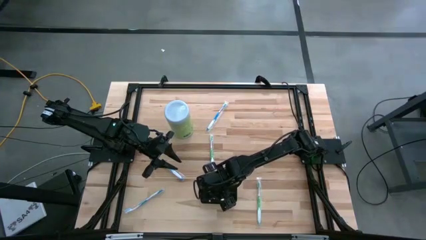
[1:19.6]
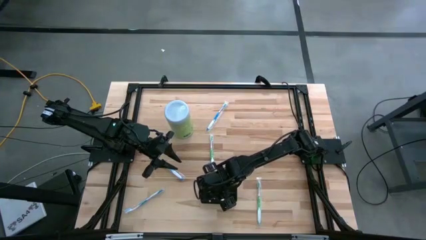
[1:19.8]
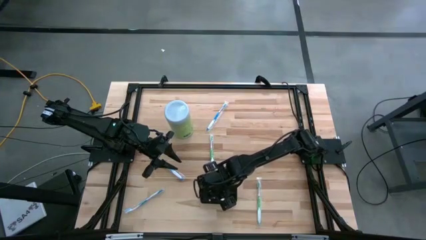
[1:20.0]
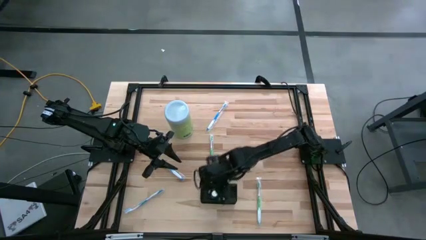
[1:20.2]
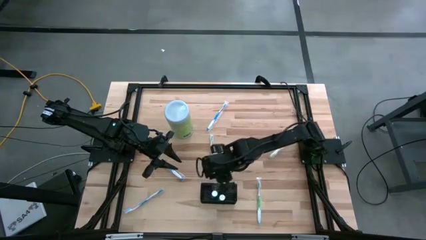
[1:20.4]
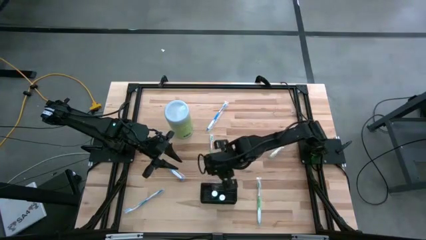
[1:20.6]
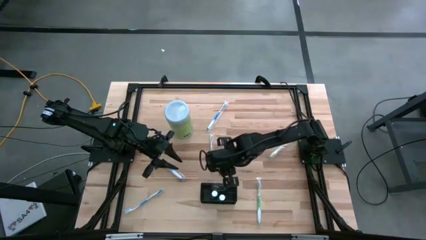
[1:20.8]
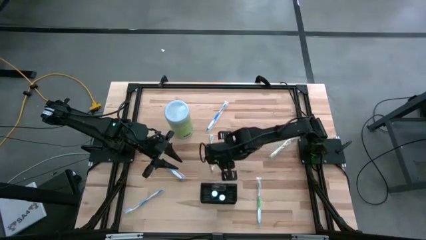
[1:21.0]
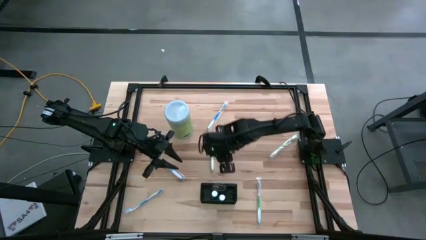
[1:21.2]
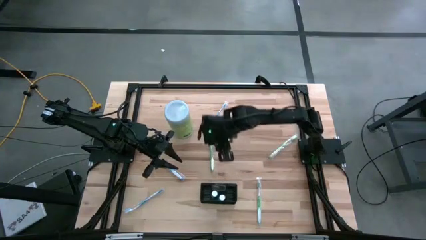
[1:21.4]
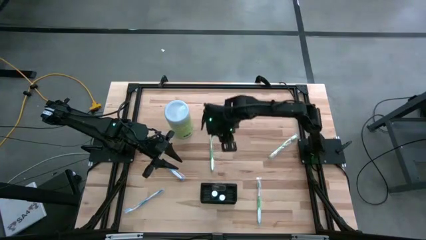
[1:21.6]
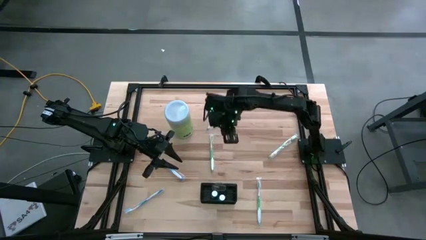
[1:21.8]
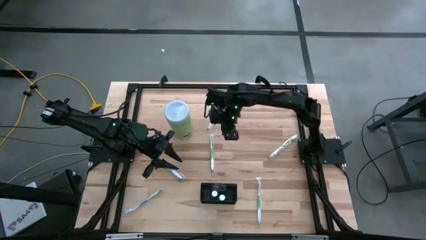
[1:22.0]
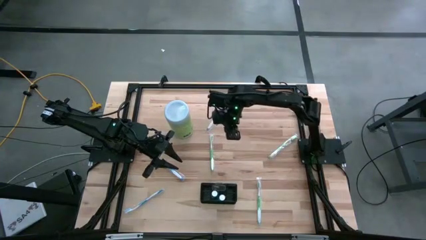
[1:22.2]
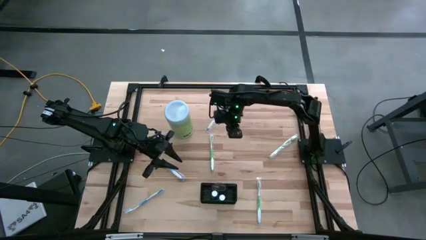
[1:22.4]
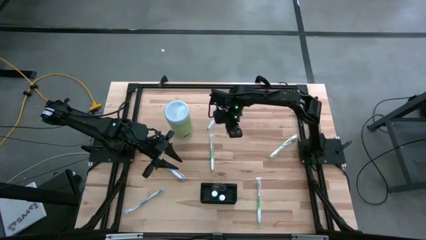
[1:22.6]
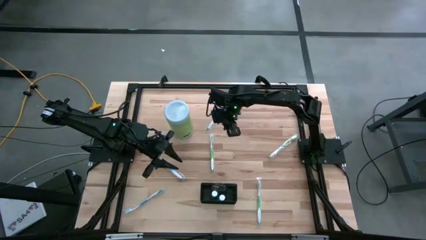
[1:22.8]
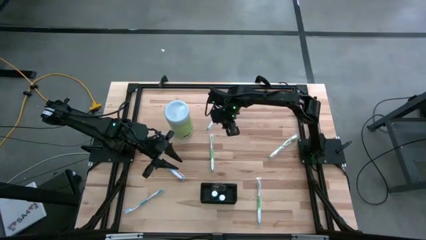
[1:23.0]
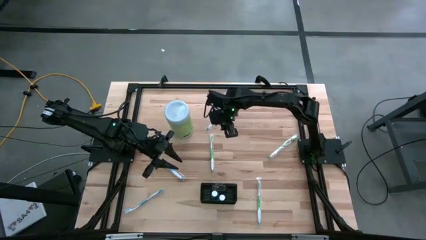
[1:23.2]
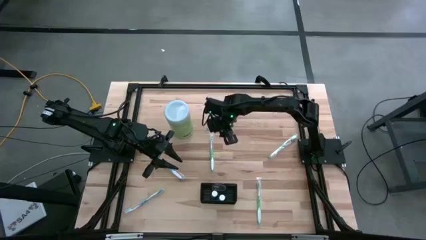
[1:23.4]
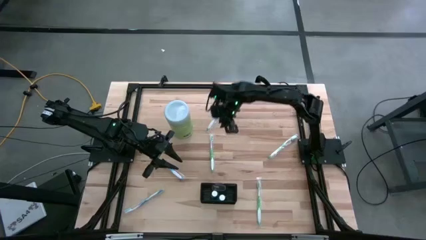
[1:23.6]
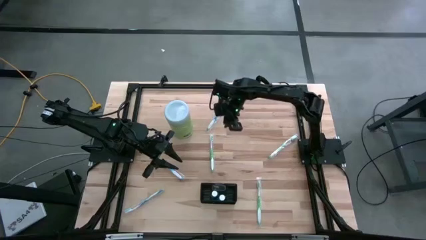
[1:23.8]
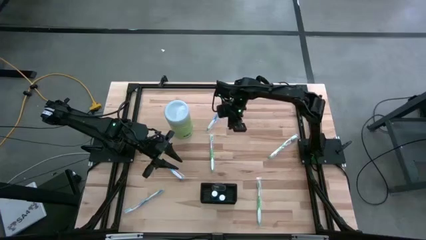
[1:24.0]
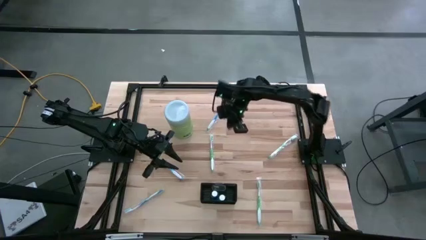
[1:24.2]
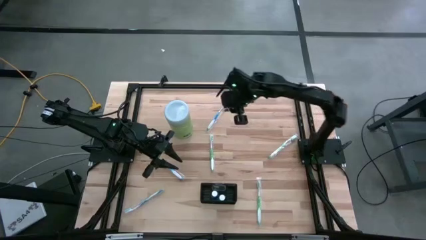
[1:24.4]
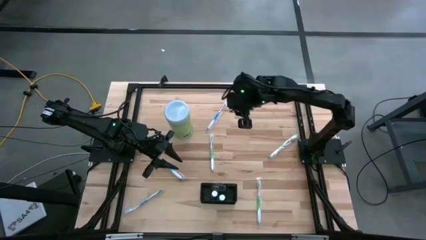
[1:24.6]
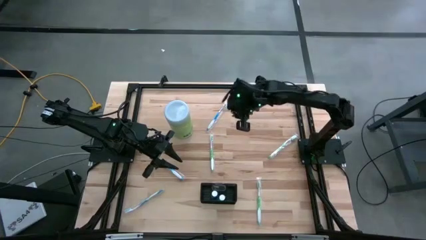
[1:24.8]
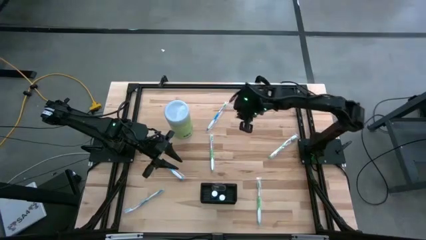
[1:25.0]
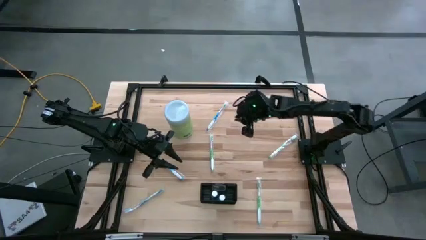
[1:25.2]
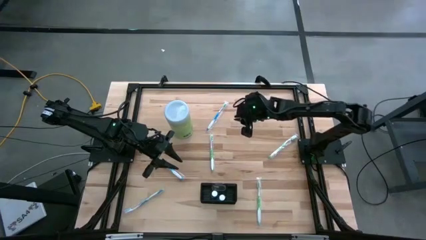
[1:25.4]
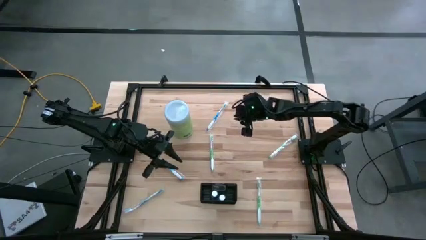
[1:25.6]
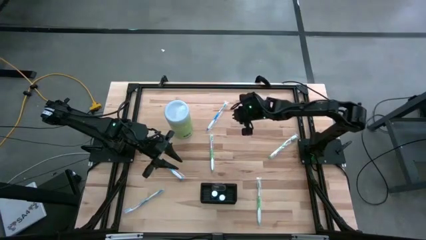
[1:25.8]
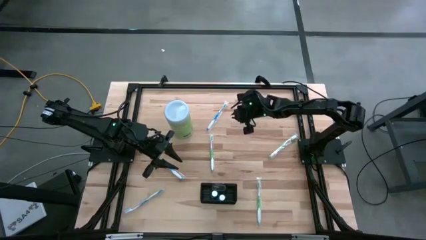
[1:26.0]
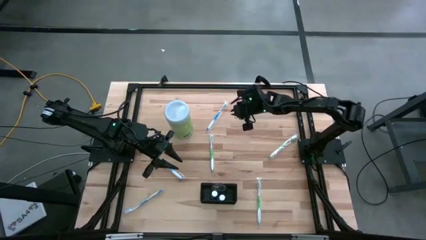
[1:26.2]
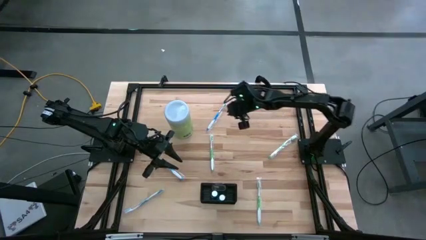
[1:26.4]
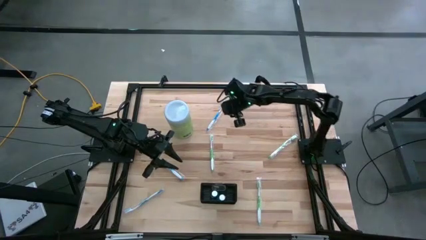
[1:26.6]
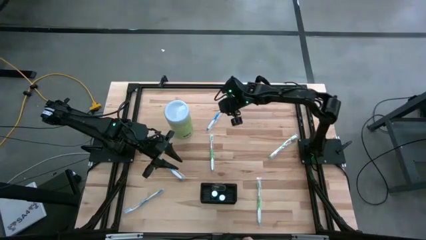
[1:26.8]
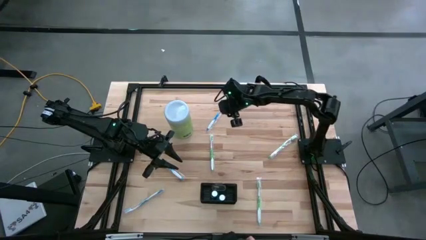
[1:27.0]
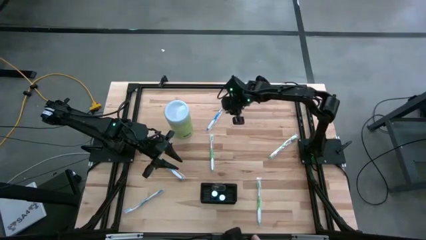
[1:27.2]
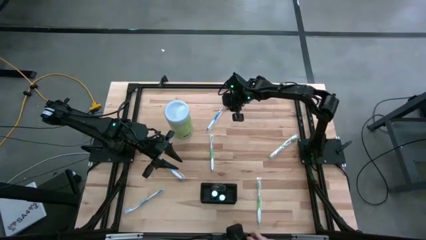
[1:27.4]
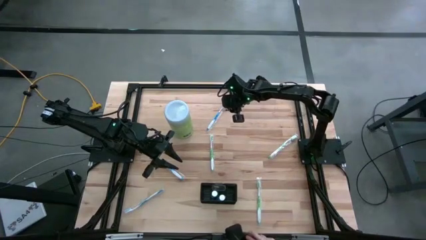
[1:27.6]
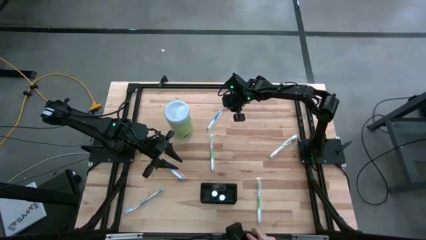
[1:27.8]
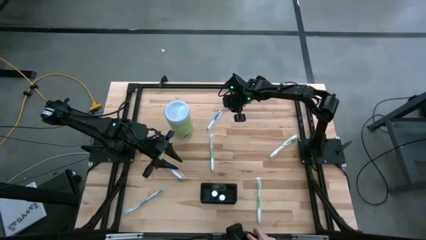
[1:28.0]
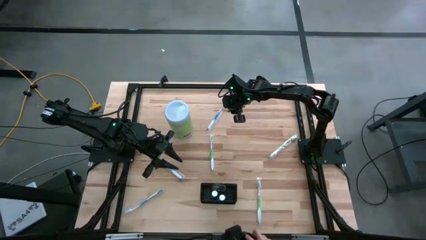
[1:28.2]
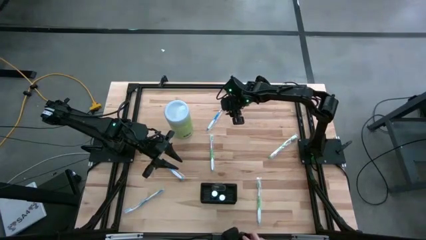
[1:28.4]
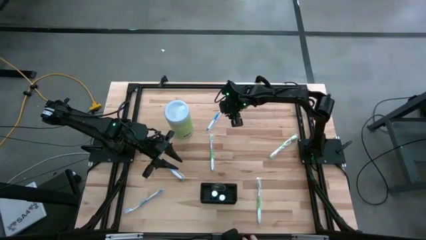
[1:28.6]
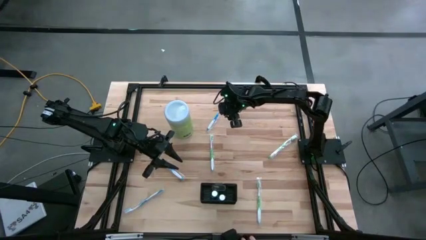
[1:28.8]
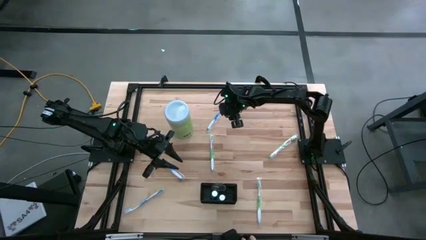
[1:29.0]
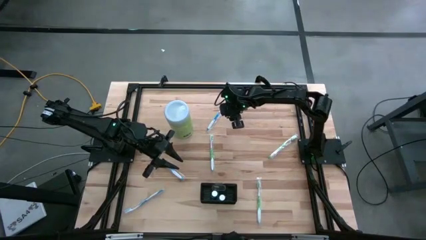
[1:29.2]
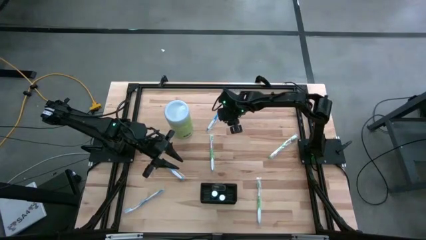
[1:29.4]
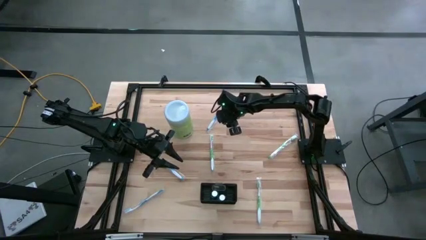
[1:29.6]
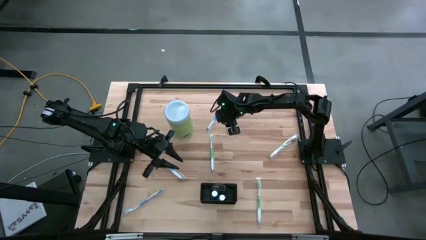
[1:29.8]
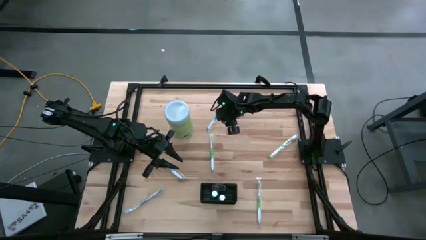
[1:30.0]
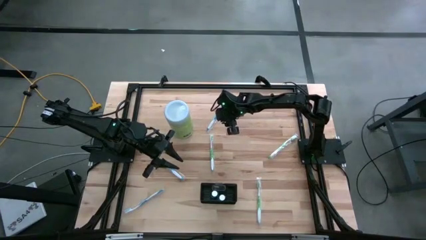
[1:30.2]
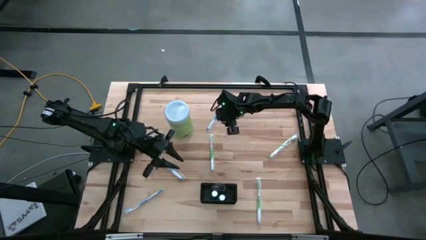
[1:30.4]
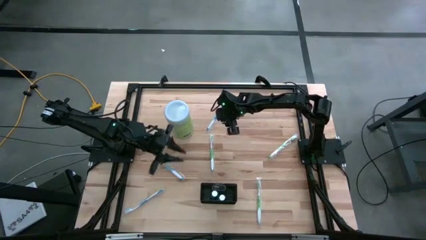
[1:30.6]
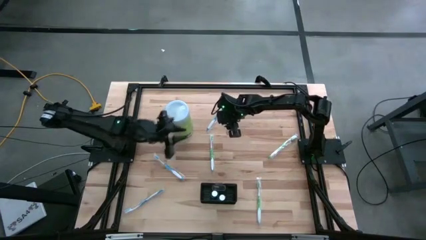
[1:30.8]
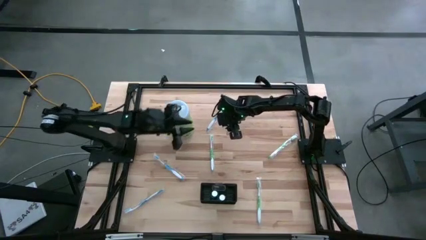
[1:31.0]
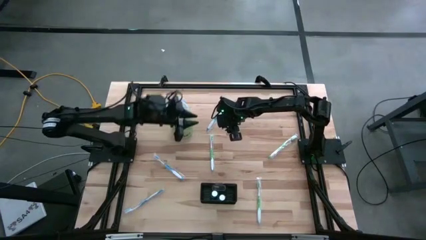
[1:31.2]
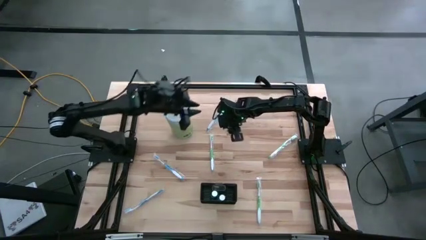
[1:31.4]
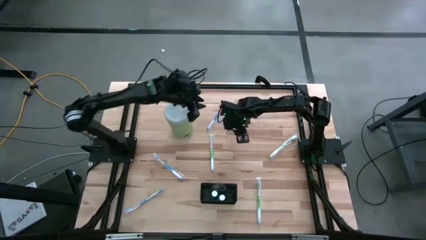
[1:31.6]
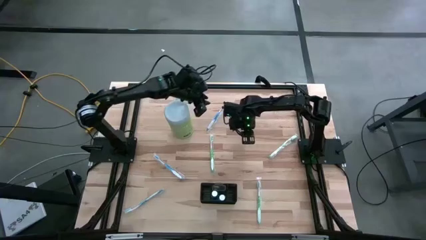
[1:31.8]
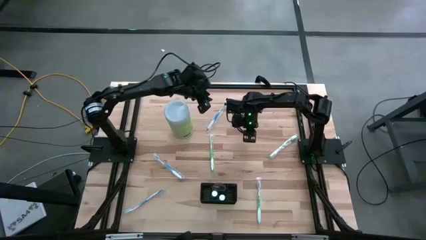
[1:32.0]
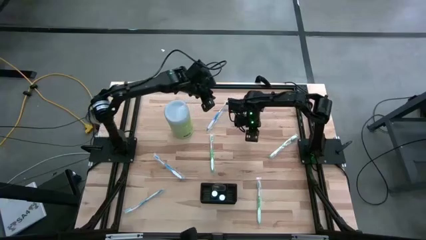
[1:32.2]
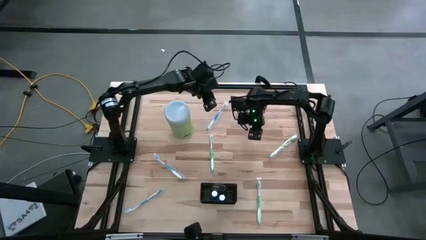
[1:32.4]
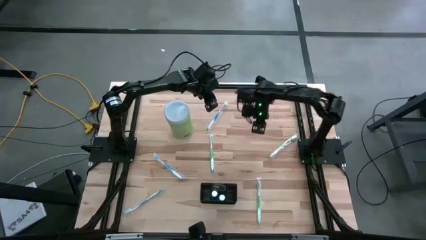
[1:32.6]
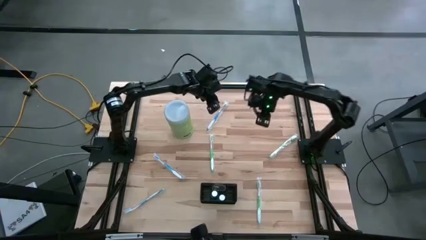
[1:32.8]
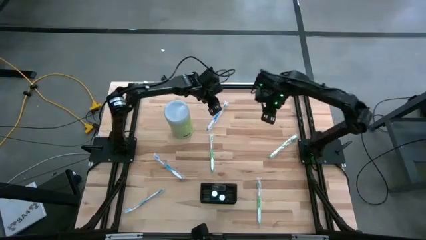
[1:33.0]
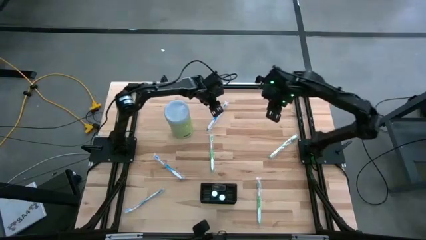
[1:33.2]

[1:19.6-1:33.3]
Task: Pick & Place toothbrushing station
Put the top blue toothbrush into the mesh organizer
